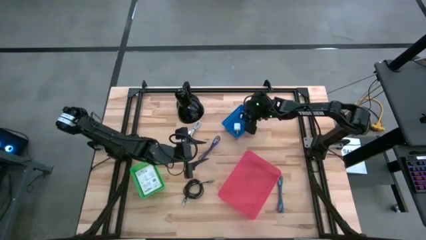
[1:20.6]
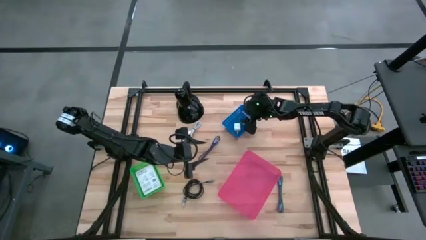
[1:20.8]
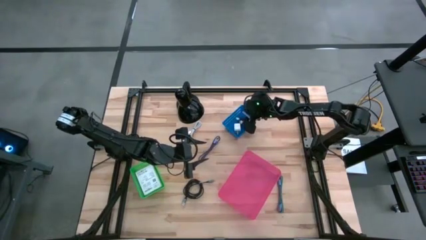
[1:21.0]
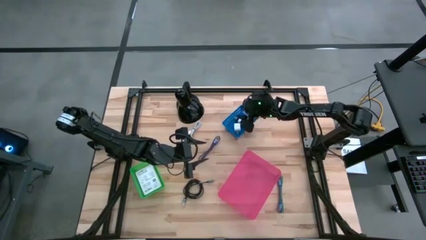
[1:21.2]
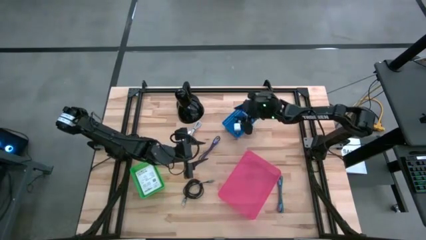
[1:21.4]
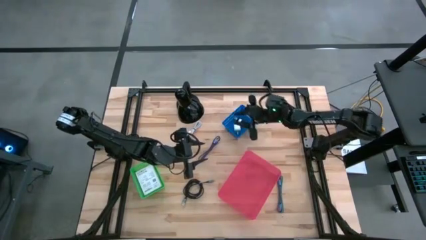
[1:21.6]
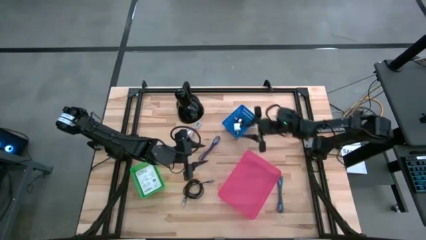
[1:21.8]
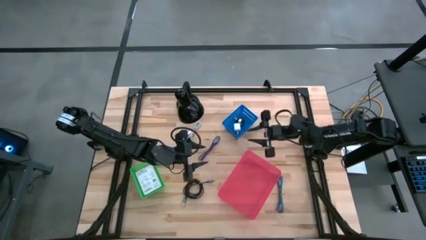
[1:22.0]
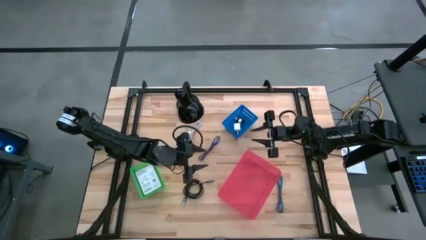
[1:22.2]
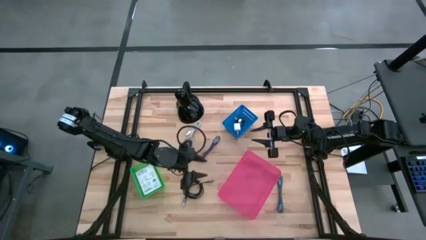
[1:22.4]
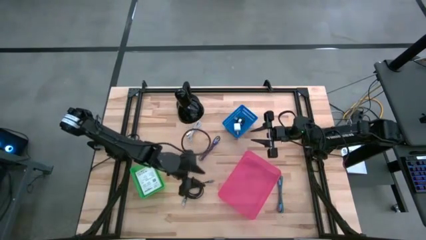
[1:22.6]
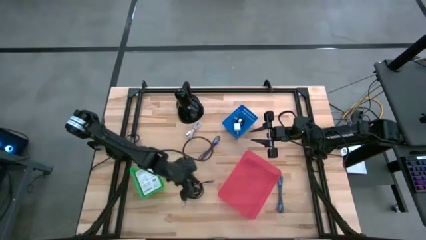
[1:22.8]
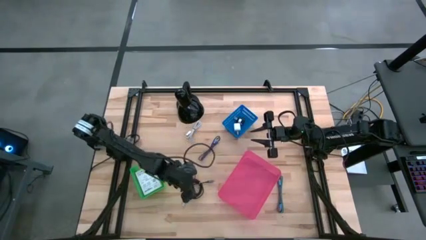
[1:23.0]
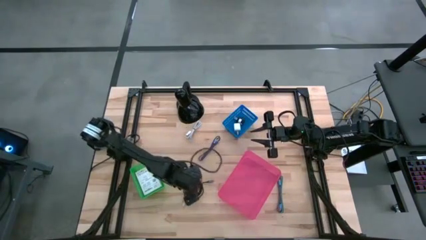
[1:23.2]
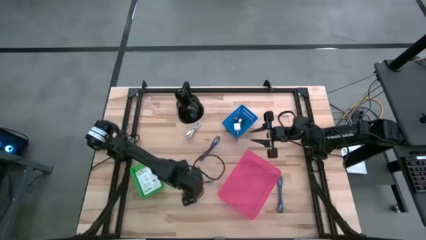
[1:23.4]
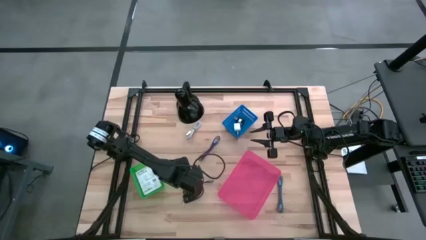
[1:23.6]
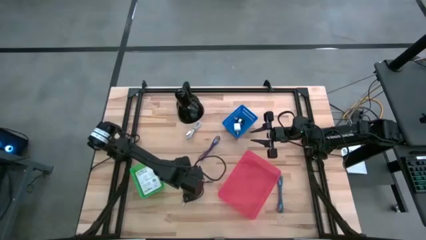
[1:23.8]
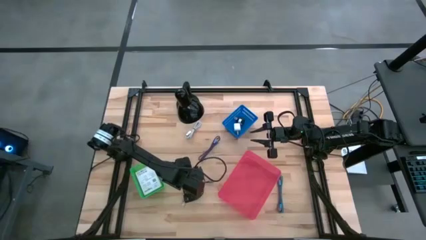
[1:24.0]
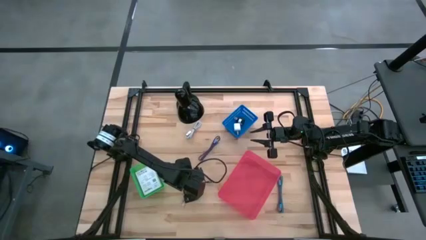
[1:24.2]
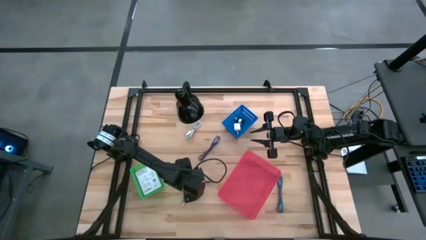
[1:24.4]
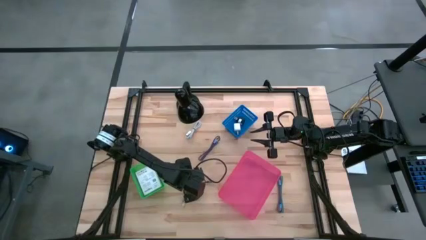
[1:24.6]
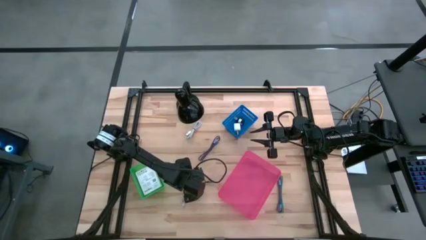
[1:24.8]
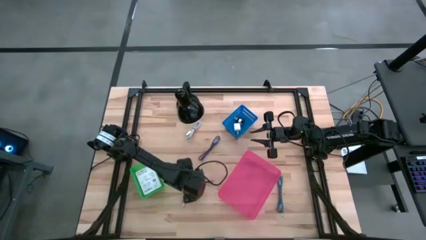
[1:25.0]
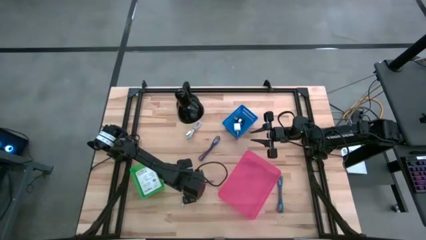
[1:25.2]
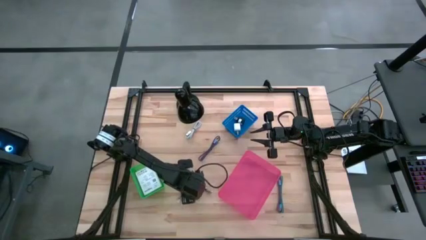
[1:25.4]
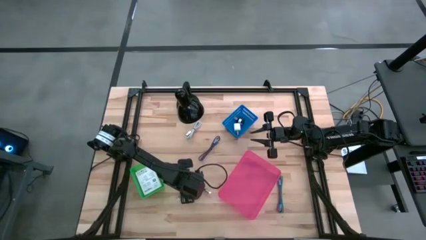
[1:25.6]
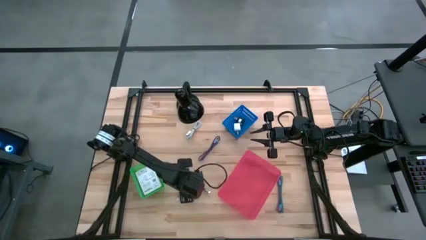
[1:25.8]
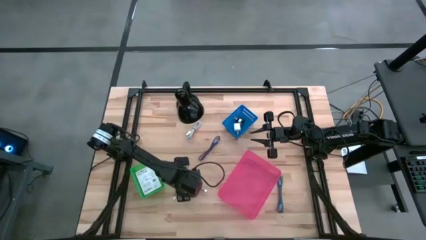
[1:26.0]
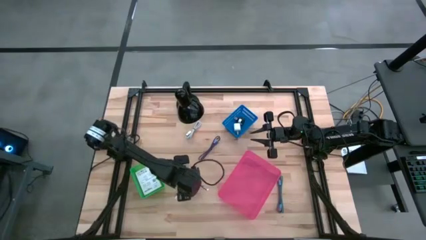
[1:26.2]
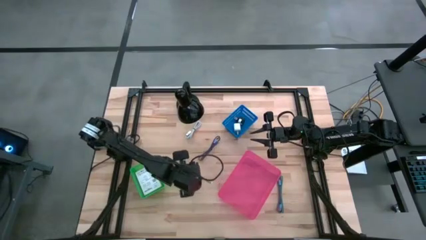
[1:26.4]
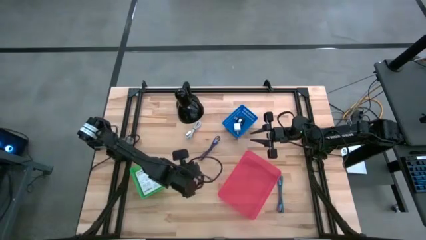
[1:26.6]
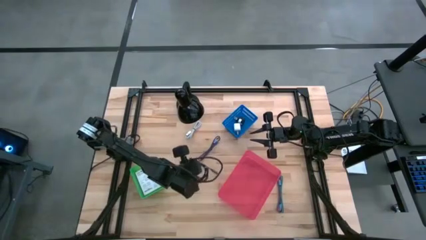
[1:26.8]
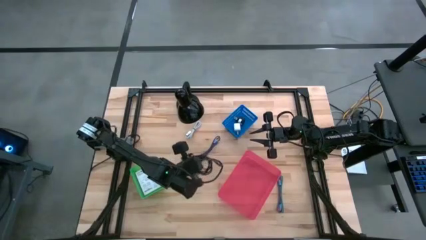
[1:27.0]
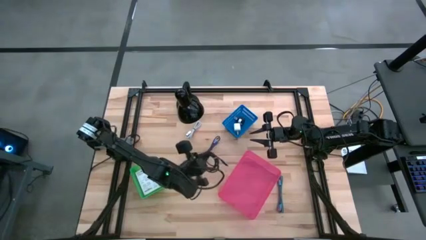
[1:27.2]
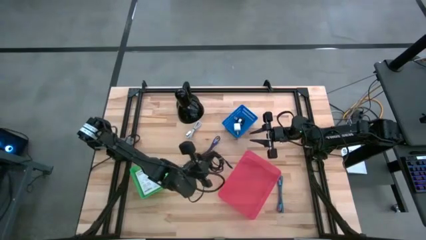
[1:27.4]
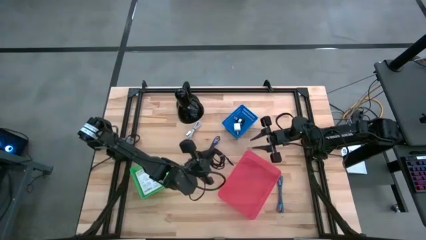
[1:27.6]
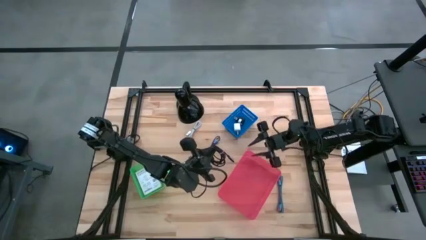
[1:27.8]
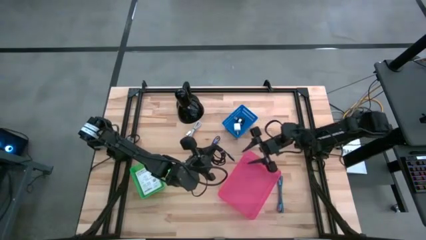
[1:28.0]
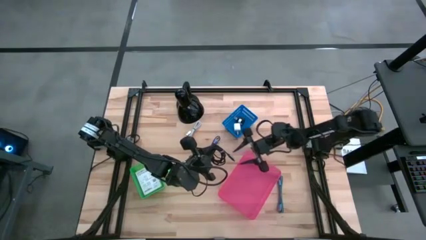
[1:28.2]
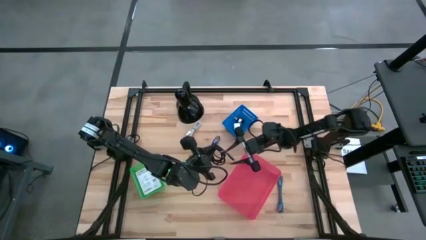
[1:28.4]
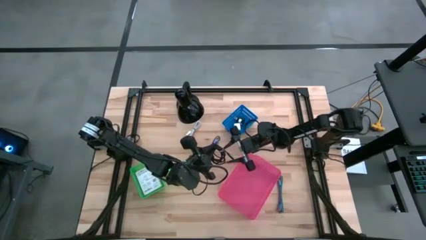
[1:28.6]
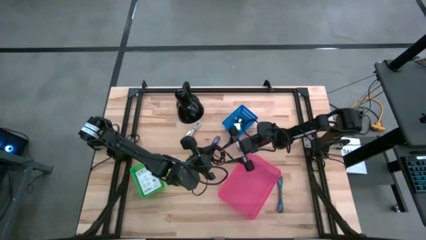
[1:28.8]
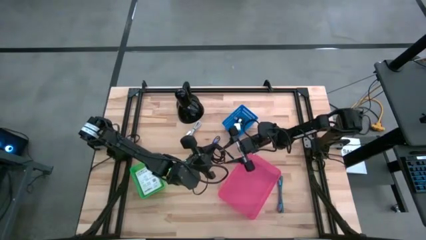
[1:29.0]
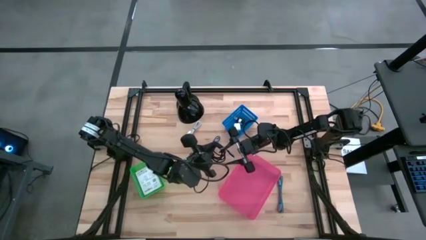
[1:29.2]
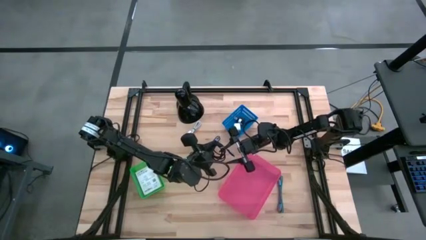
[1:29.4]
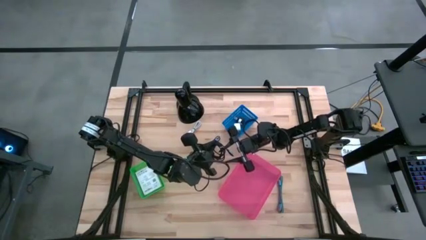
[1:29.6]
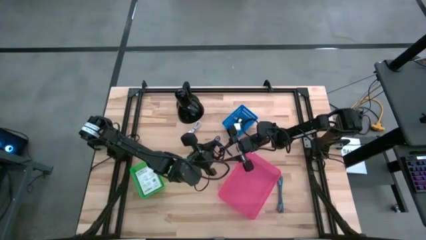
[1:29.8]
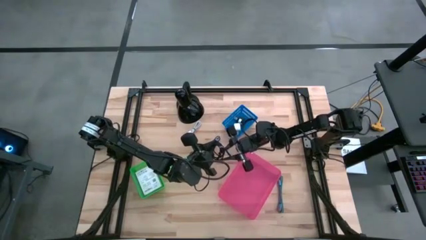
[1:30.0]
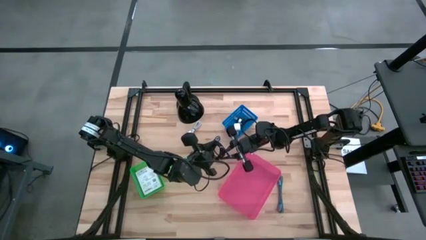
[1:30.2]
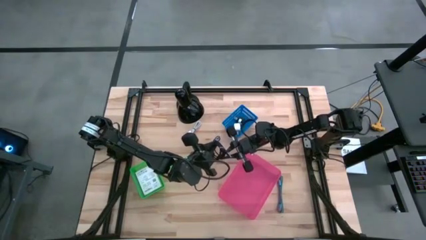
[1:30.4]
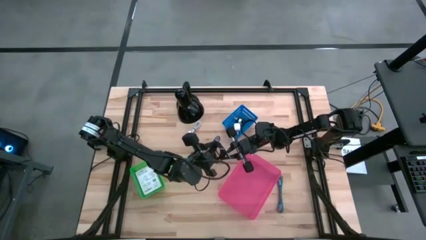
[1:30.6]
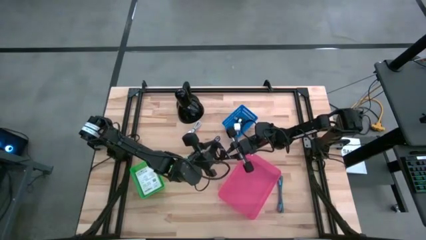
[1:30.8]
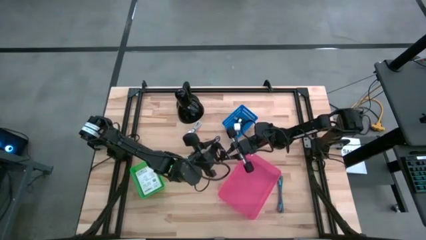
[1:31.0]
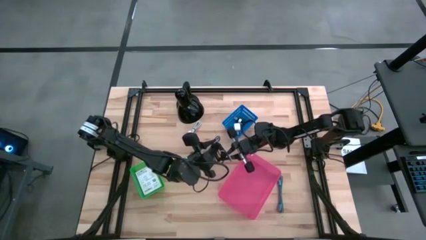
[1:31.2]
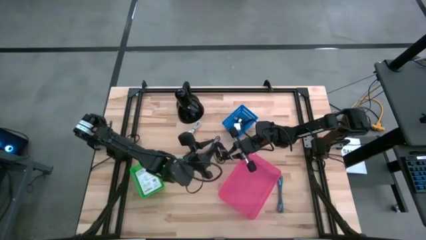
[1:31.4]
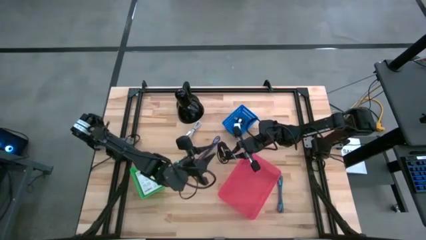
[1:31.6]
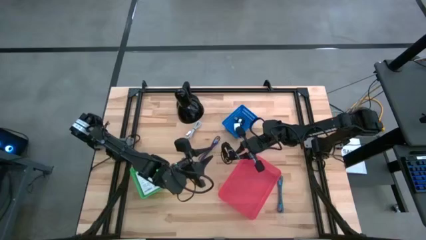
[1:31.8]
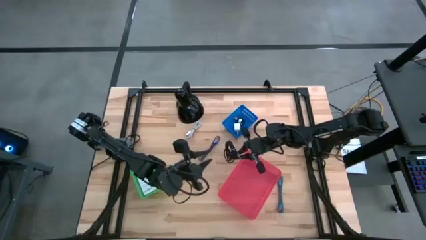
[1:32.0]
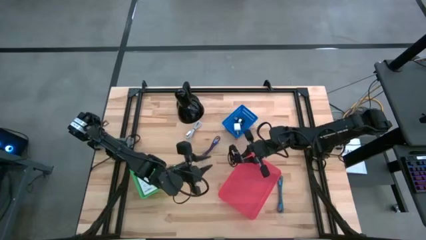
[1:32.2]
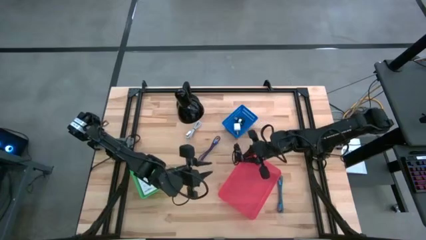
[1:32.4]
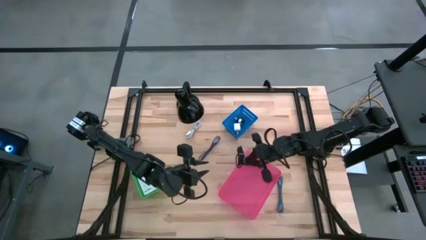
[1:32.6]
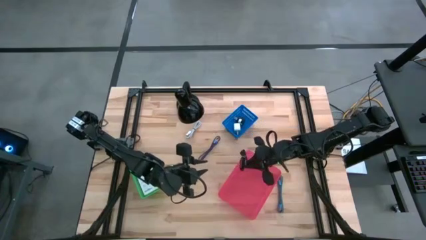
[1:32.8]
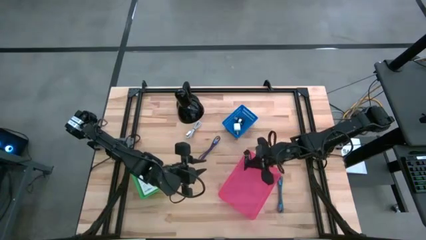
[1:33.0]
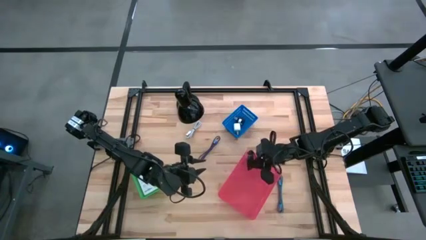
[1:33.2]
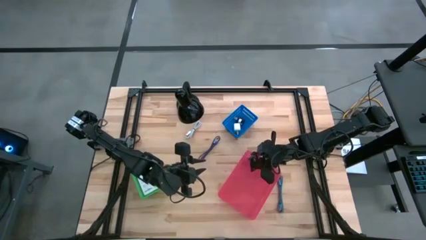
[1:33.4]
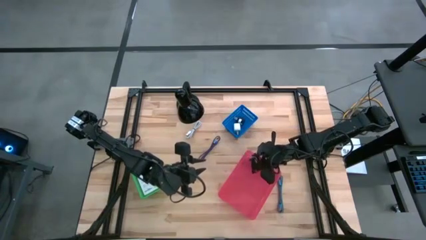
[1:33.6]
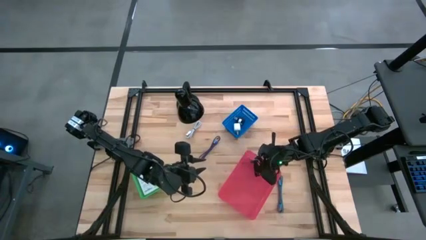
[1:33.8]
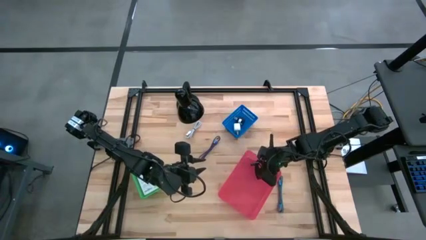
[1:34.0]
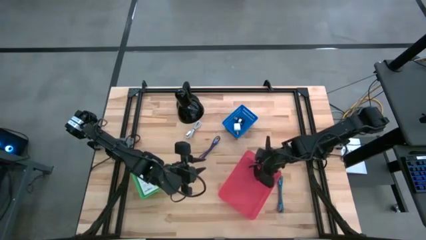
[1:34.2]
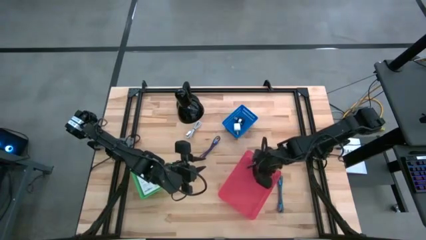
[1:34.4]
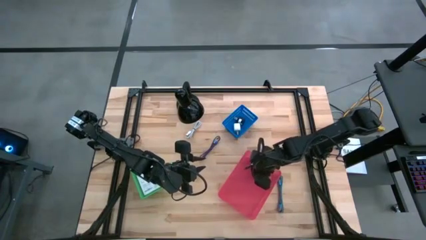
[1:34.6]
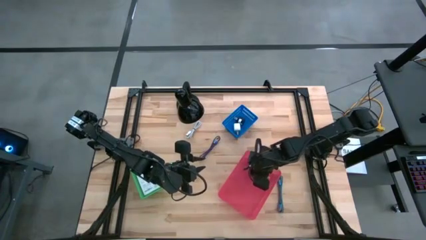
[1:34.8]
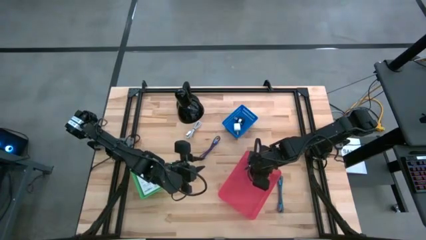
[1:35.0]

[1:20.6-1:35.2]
Task: Pick and place items into bin
Put the black charger cable into the pink bin
